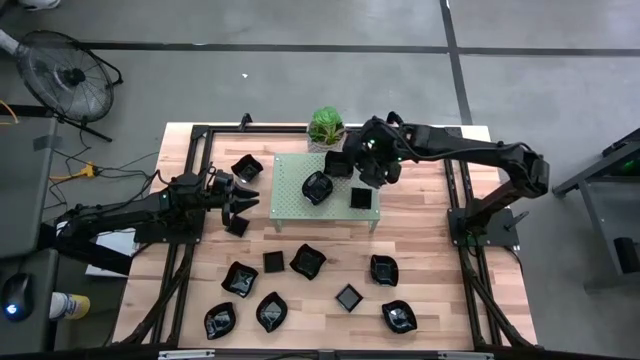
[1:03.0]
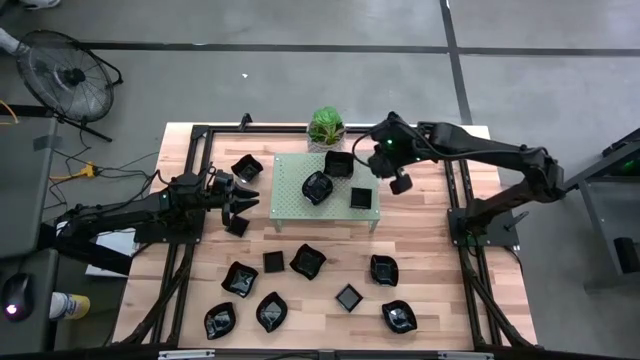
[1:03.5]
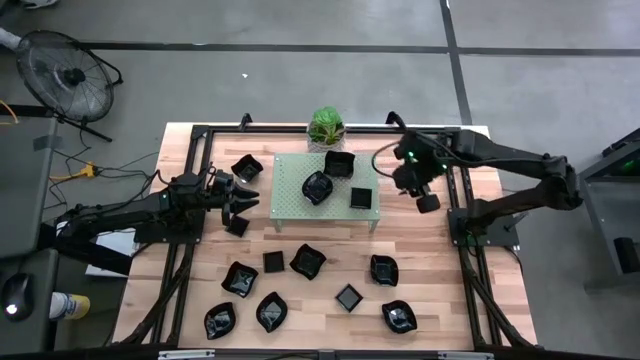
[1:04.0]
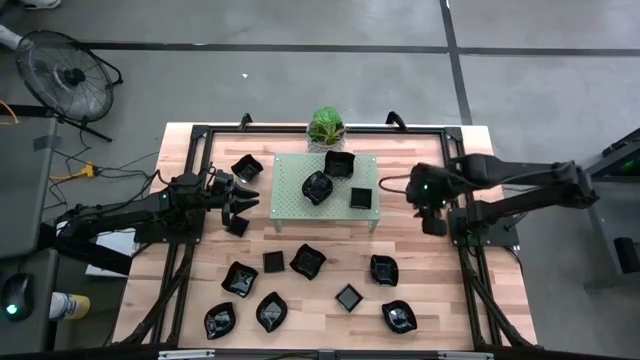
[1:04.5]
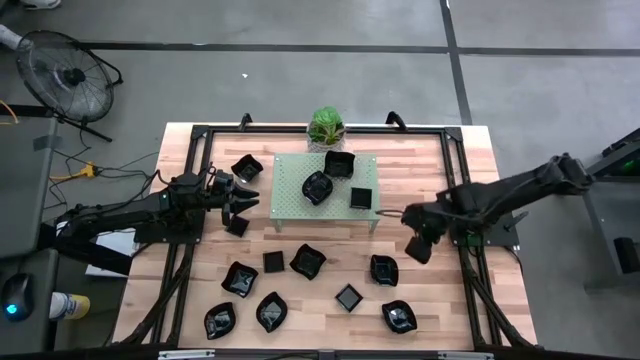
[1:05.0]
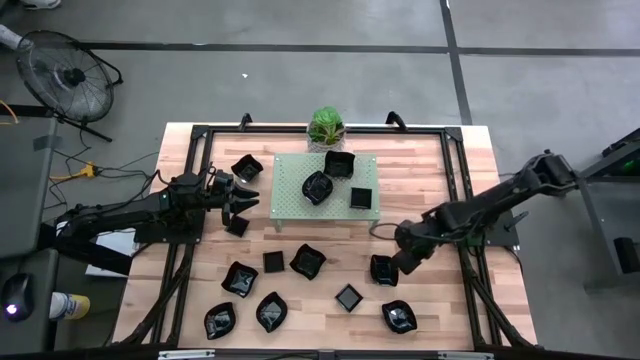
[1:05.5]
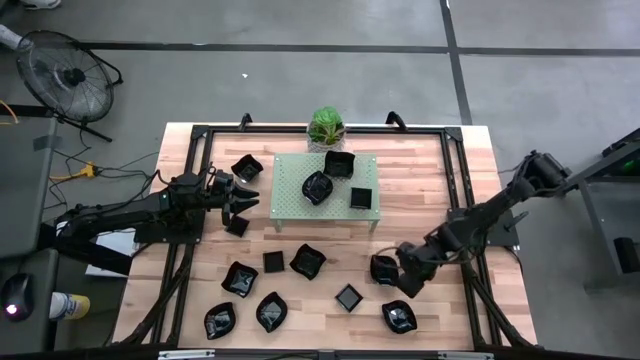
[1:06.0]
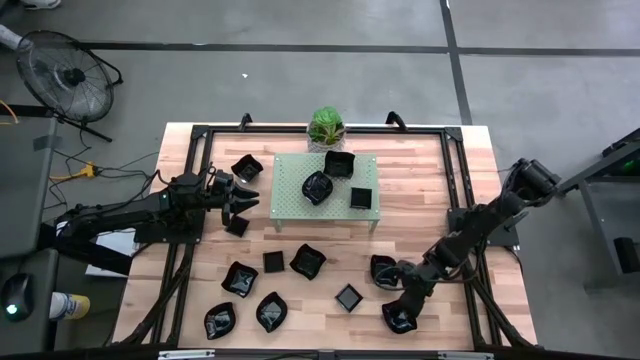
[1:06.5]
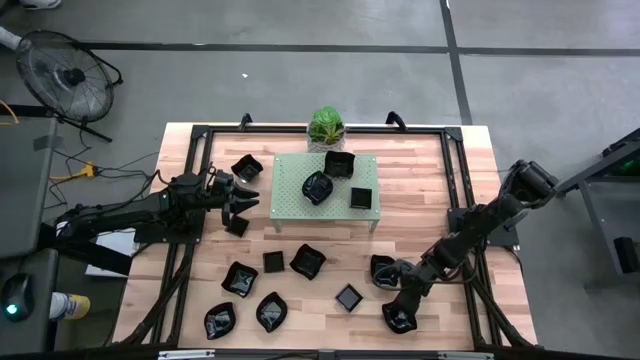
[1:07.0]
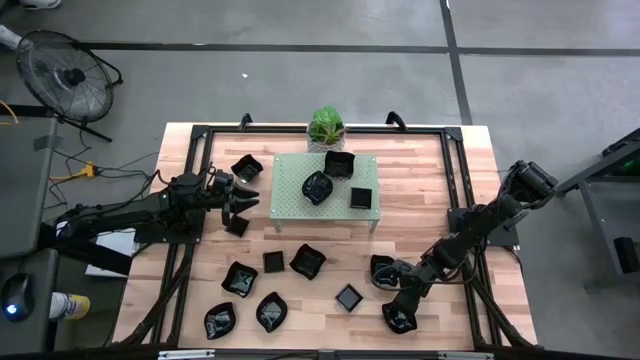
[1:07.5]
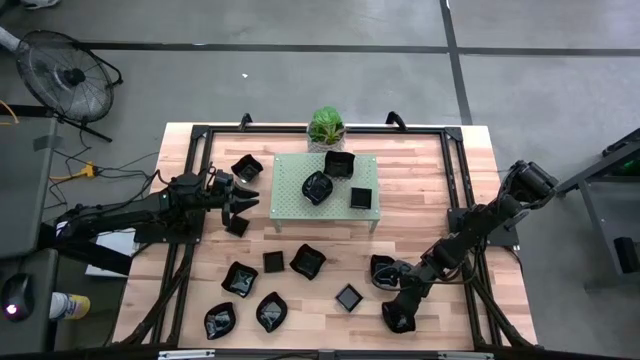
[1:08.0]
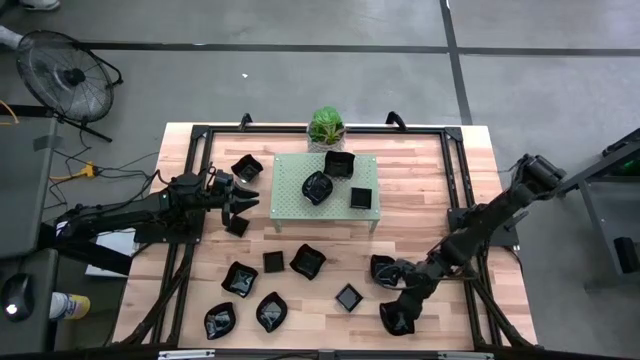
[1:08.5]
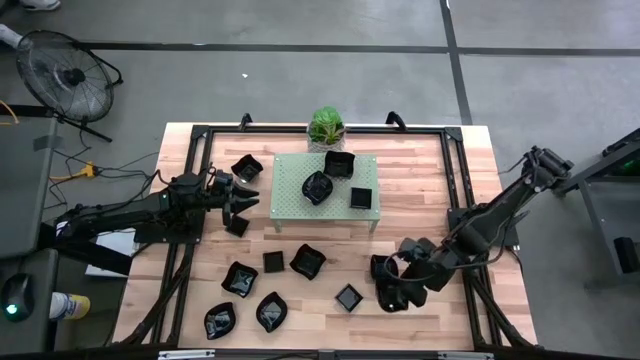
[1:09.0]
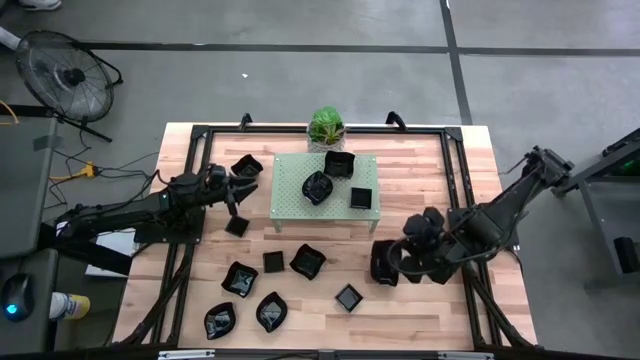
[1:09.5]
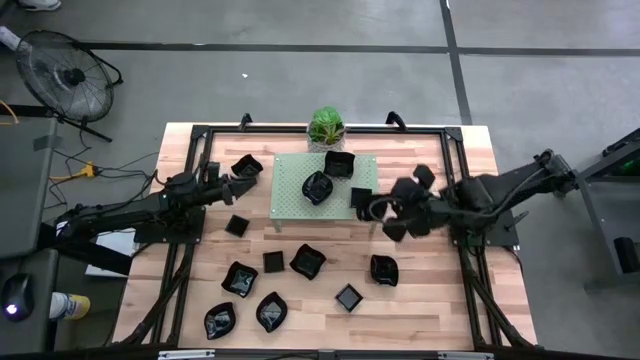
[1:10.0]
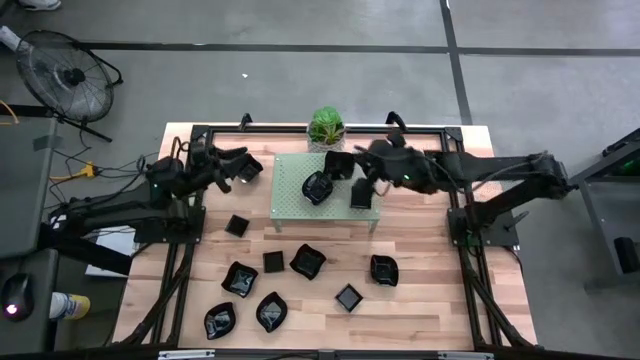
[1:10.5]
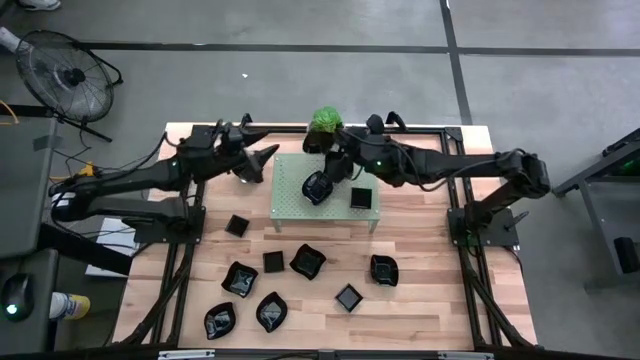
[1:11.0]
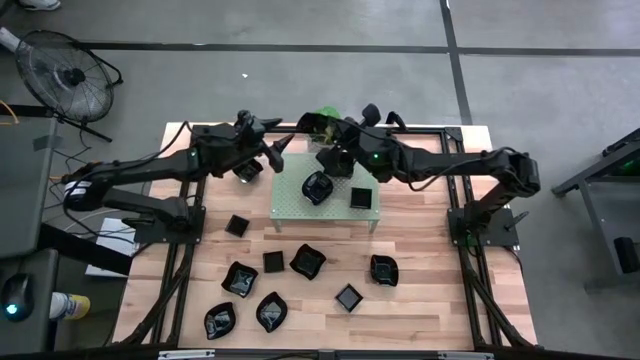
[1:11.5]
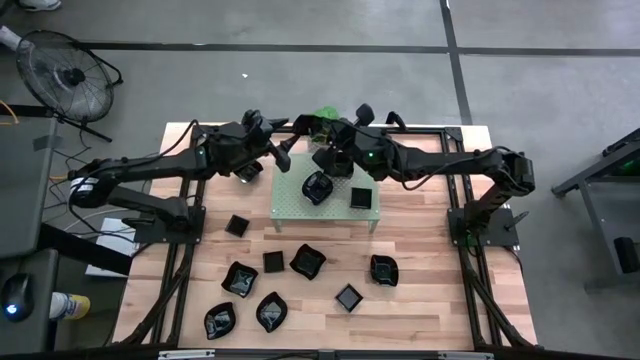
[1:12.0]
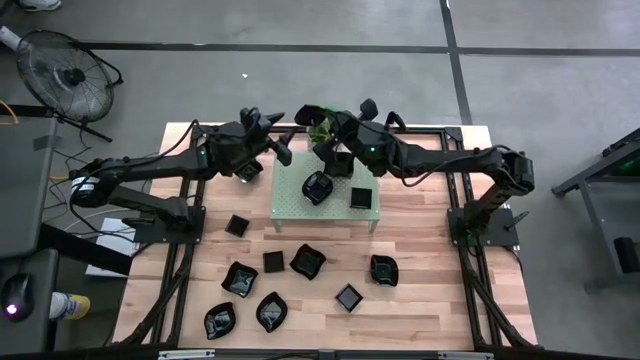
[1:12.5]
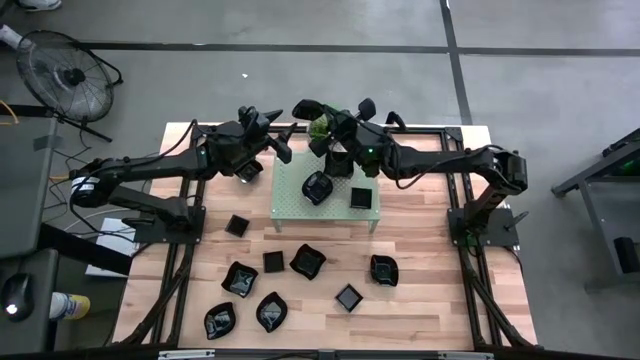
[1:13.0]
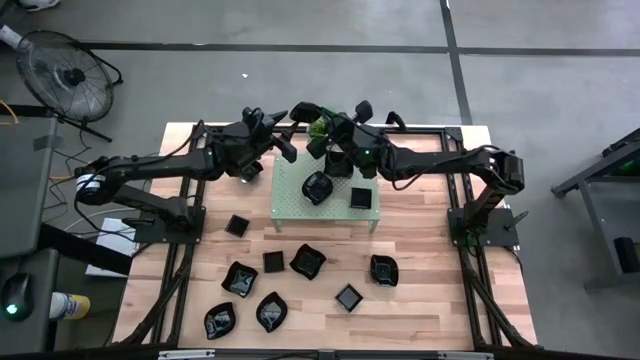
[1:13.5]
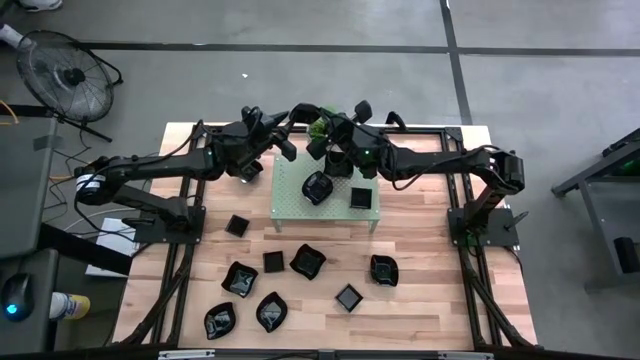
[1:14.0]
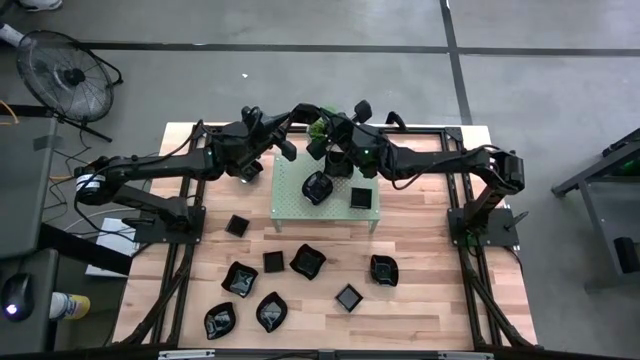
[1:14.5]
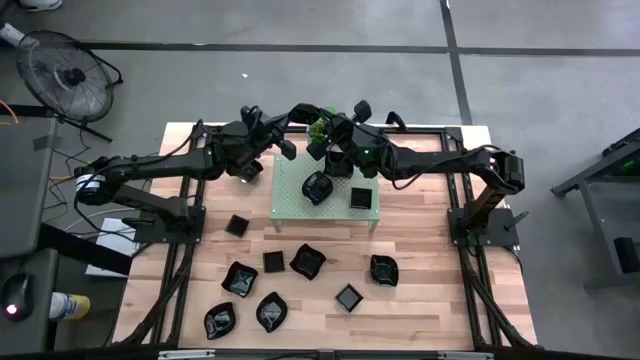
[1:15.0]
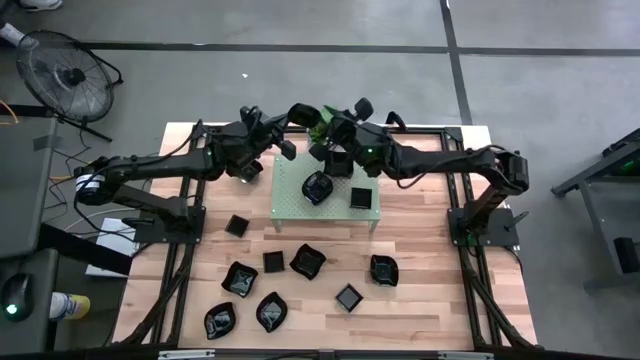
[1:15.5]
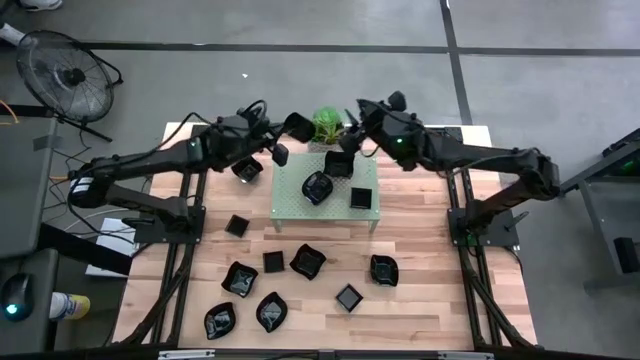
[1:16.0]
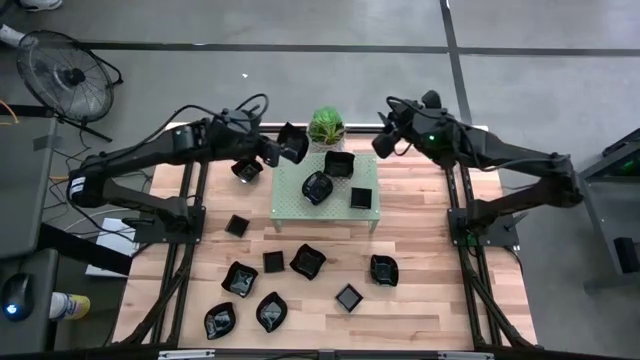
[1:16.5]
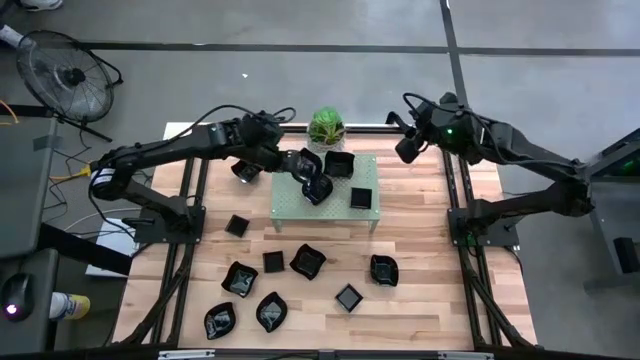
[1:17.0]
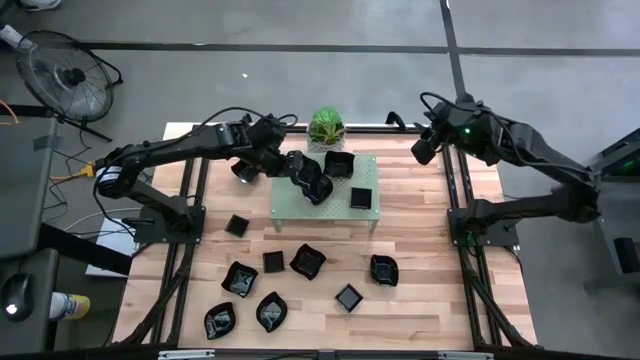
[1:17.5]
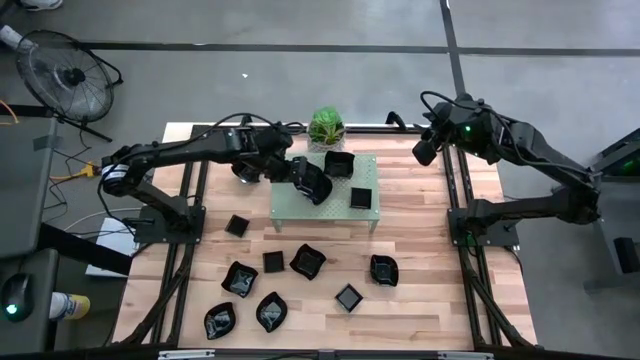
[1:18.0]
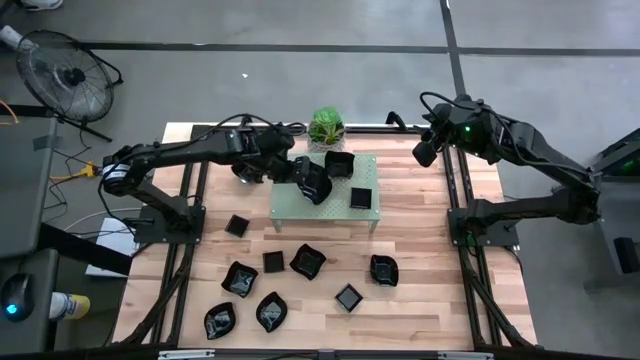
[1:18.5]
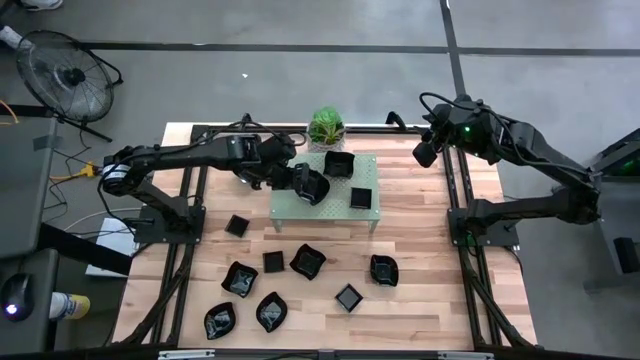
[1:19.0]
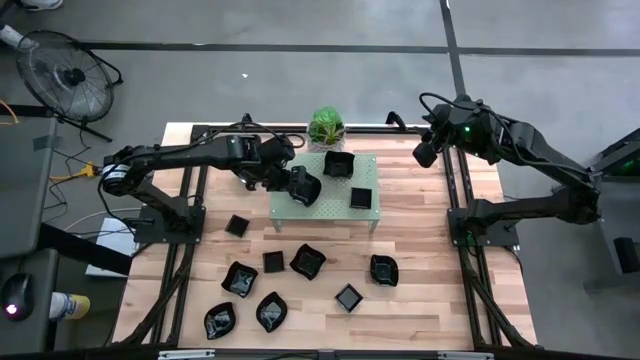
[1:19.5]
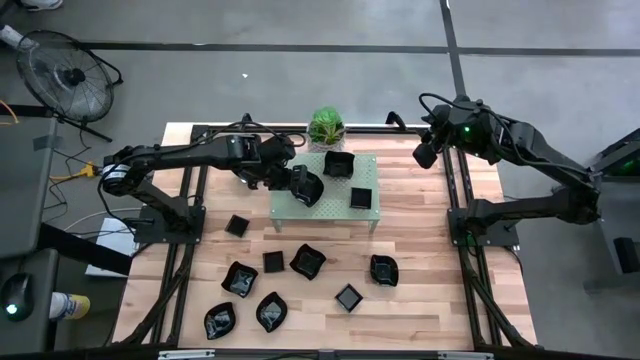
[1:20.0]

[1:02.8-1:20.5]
Task: Pick & Place Mini shaped plates
Stack the black leaf plate on the other black leaf plate on the shelf

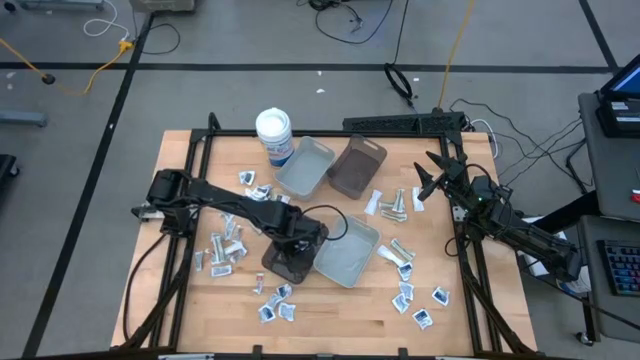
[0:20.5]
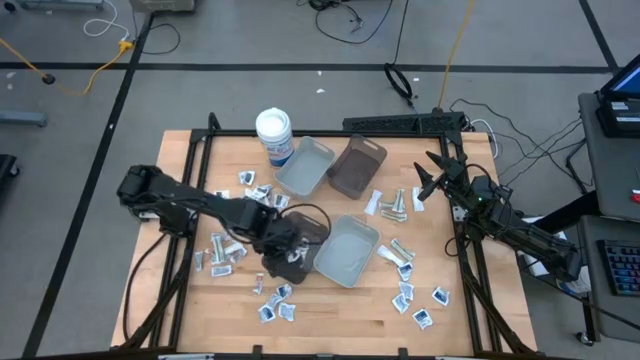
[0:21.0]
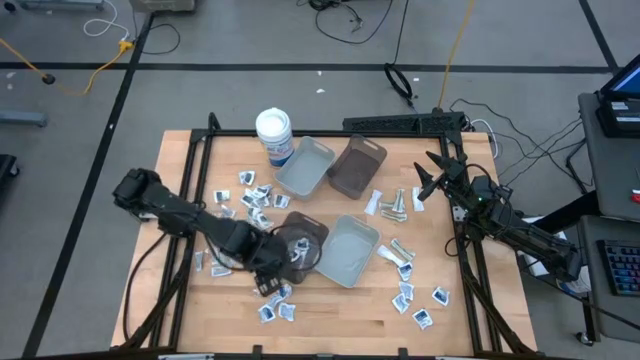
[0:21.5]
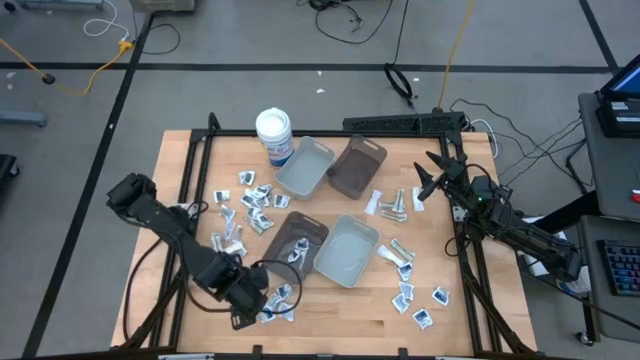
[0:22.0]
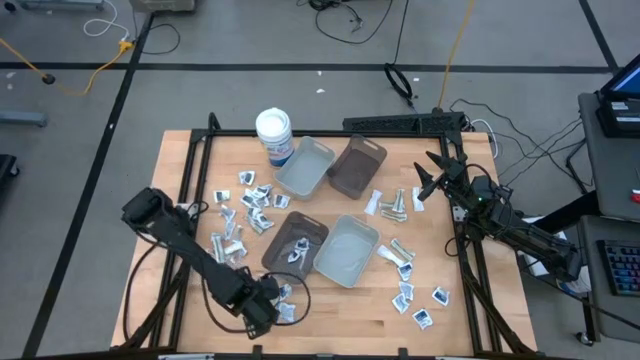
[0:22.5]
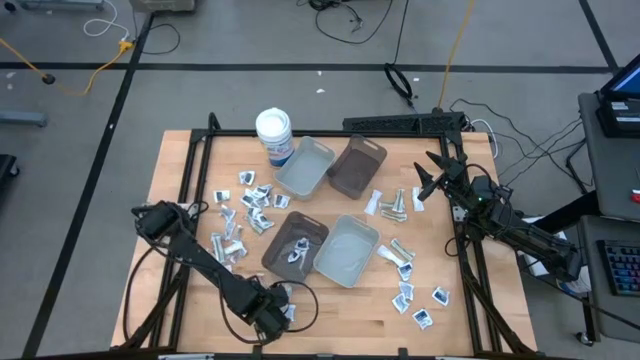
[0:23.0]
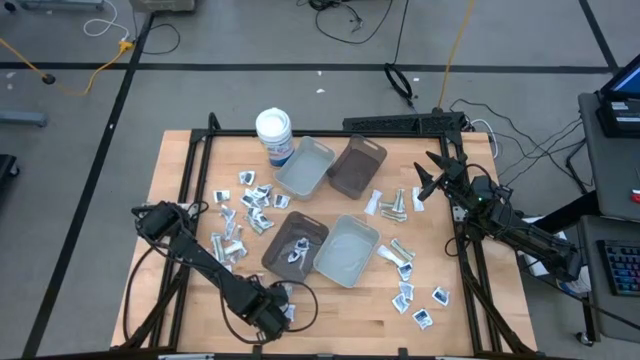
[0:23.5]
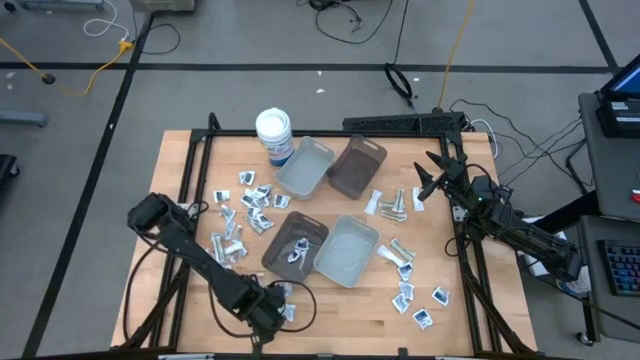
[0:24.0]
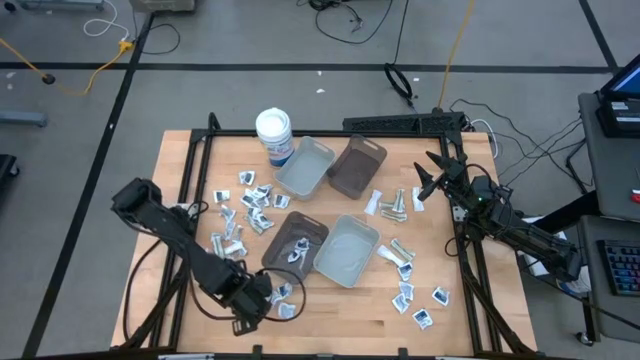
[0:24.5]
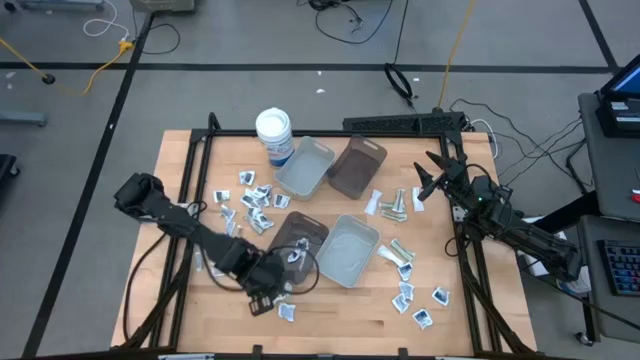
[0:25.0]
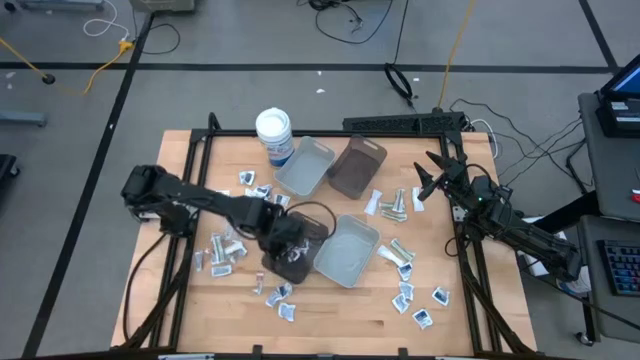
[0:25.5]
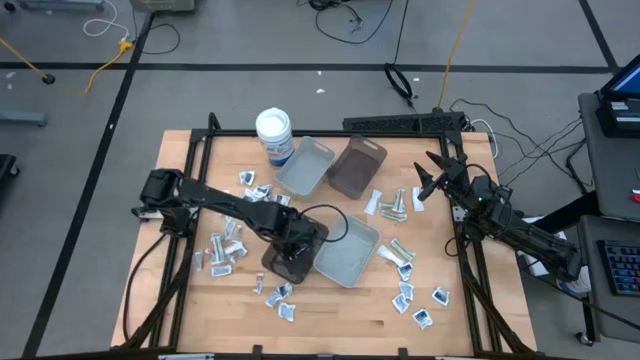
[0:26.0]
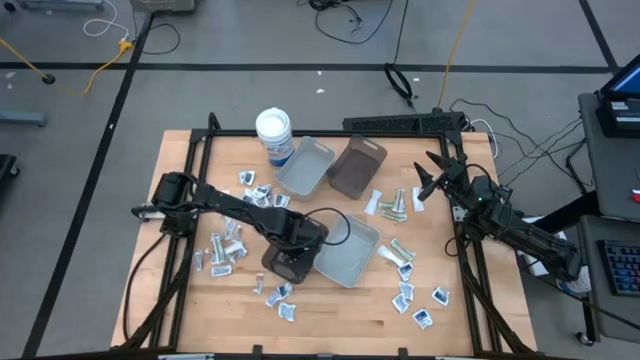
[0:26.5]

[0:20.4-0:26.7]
Task: Pick & Place First Aid Supplies
Put the blue alcohol pad into the bottom black bin
